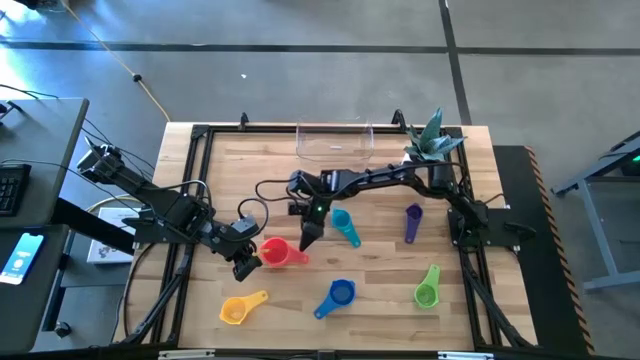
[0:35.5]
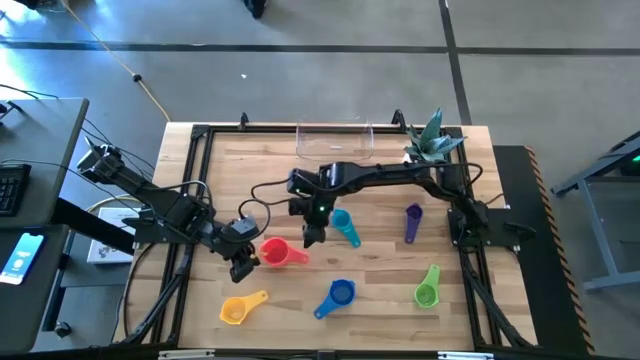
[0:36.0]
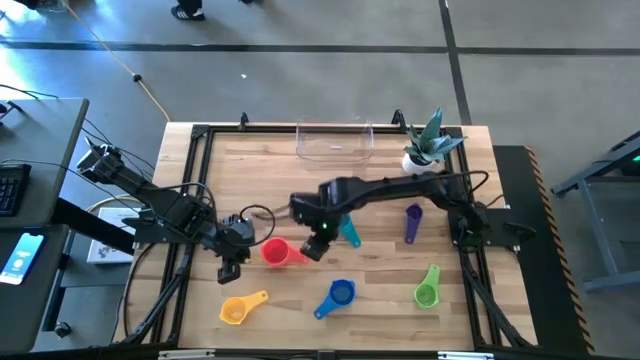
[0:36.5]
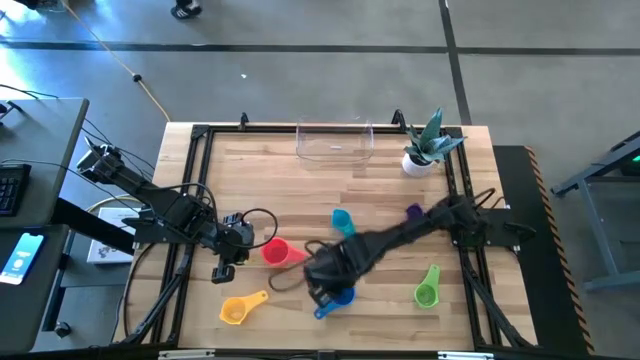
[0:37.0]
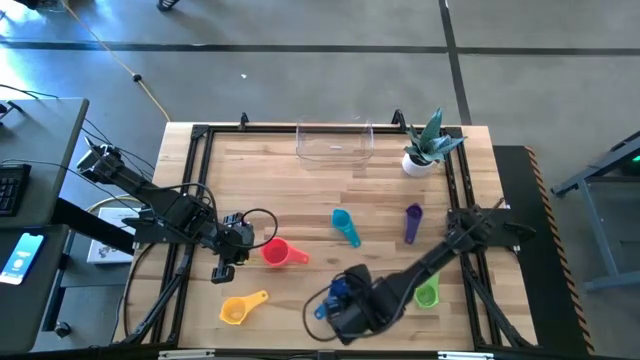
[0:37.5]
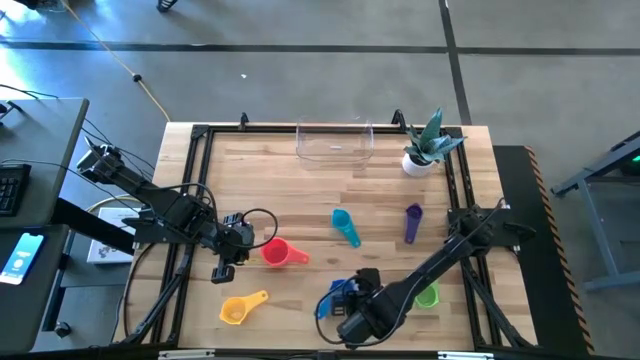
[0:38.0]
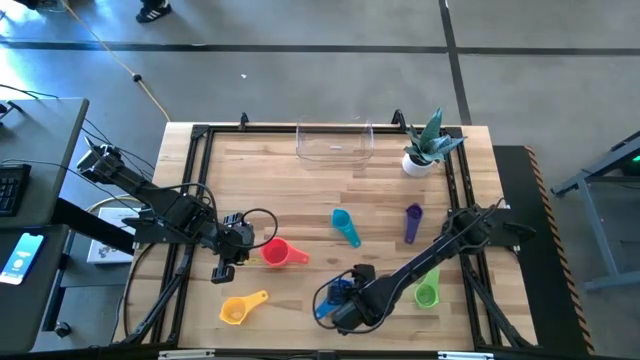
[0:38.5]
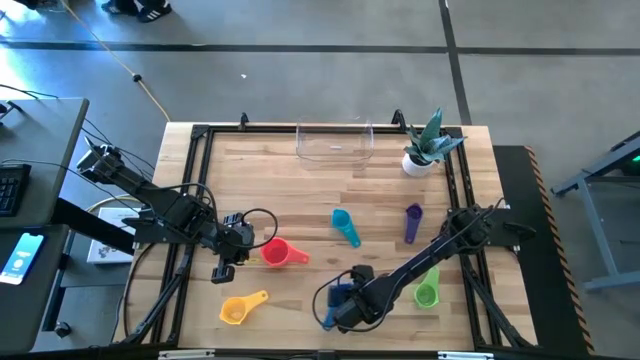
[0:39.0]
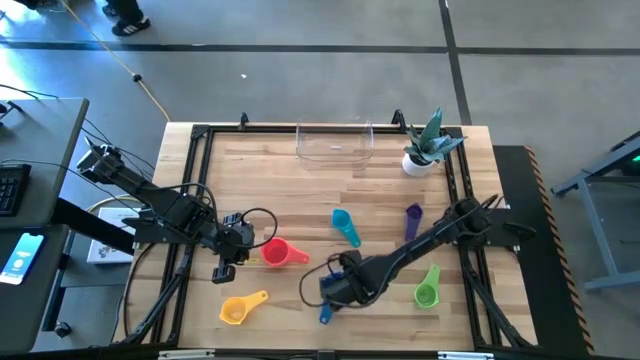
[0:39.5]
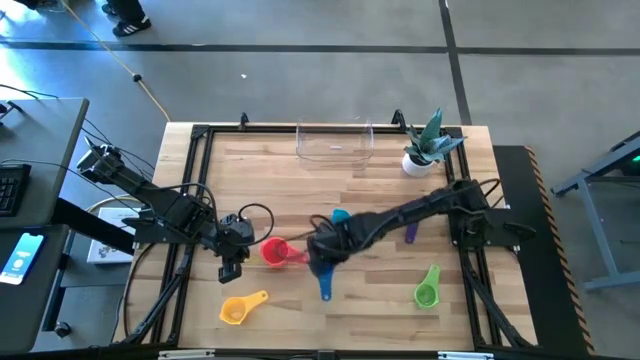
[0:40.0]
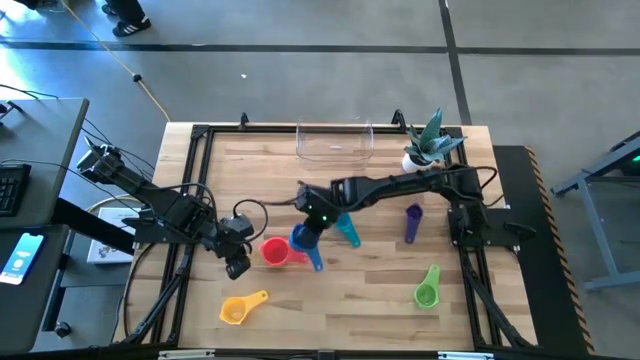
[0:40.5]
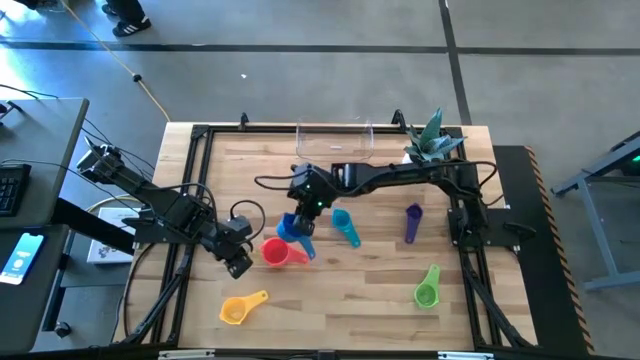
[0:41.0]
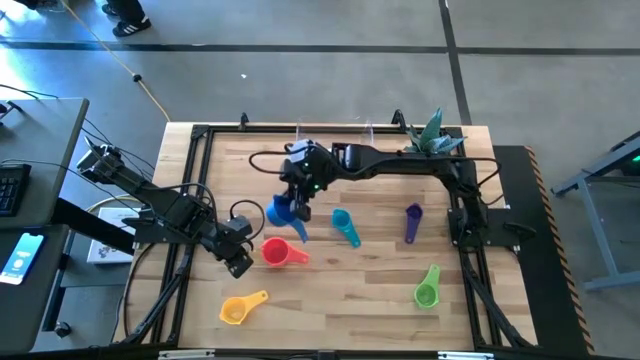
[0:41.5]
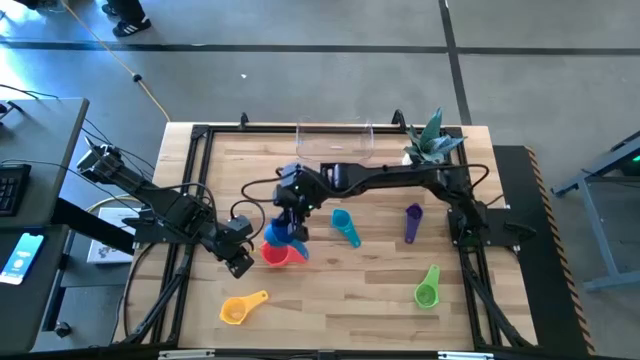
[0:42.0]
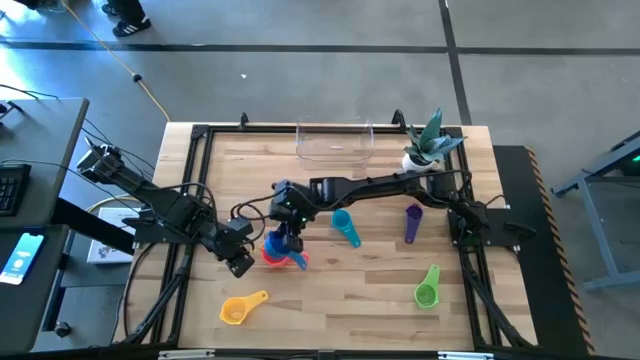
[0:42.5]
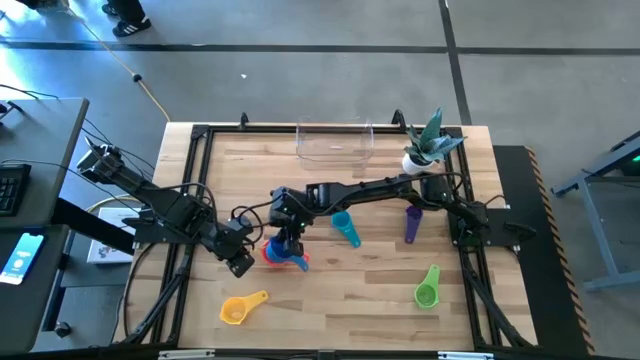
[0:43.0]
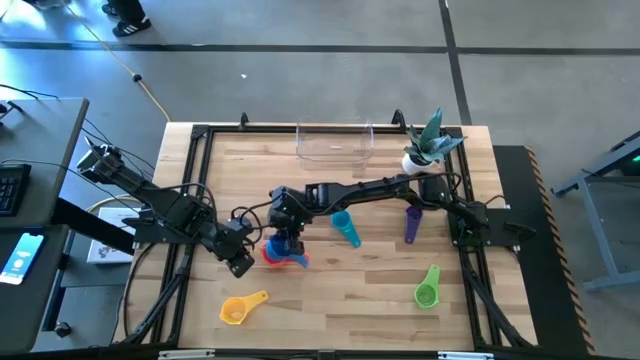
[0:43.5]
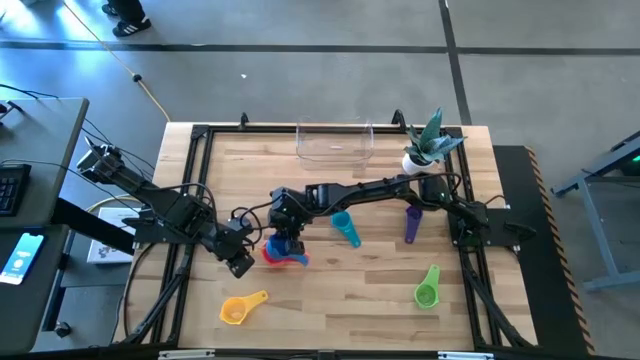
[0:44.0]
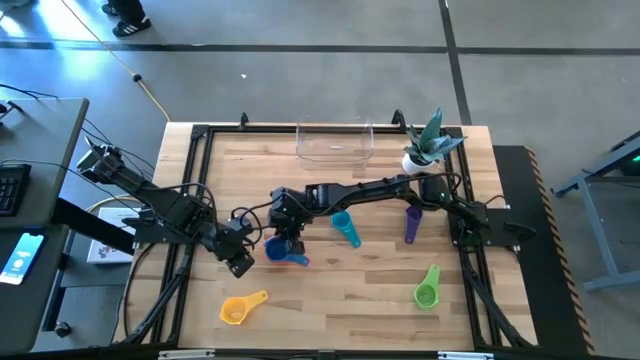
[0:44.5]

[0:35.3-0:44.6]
Task: Nest measuring cups in basket
Stack the blue measuring cup on top of the red measuring cup

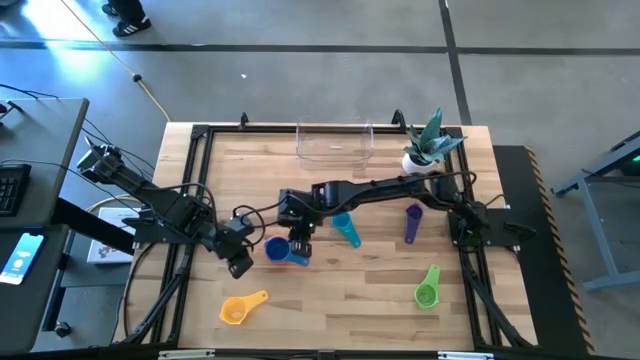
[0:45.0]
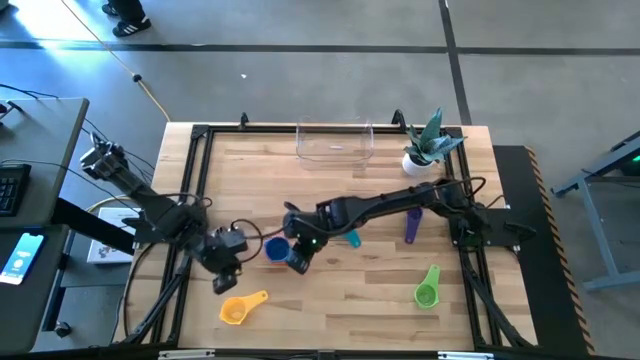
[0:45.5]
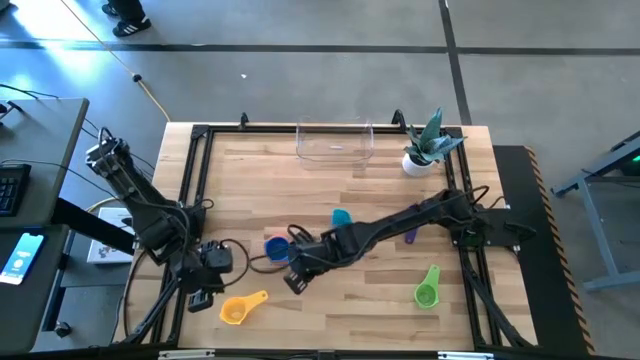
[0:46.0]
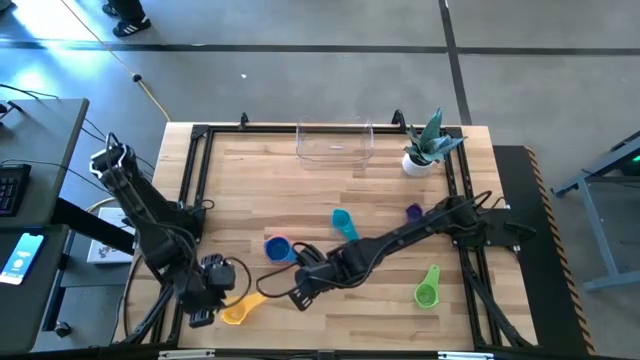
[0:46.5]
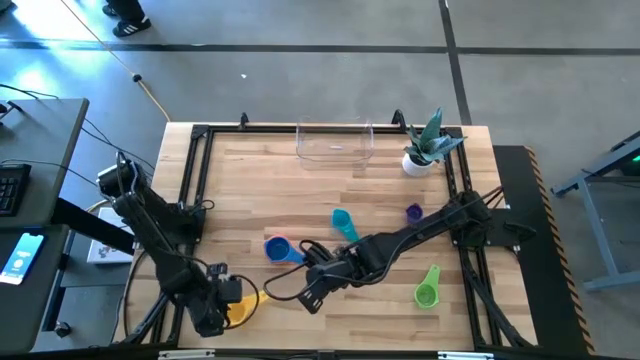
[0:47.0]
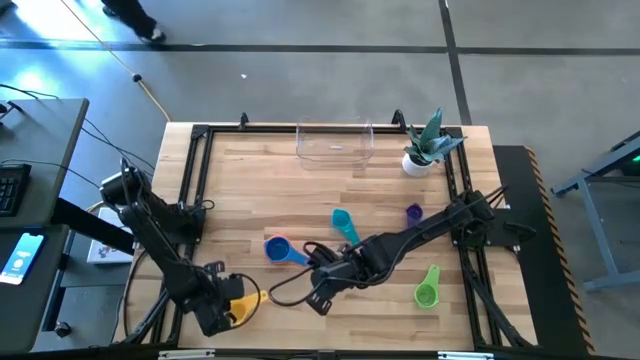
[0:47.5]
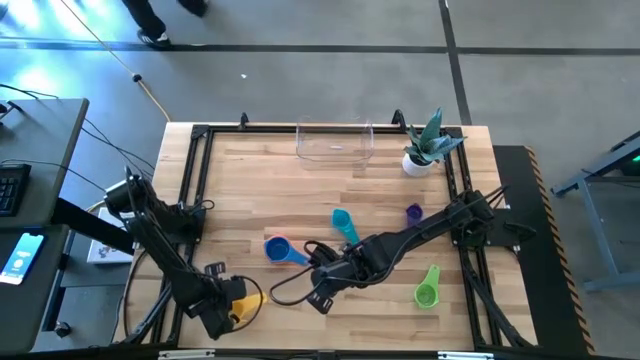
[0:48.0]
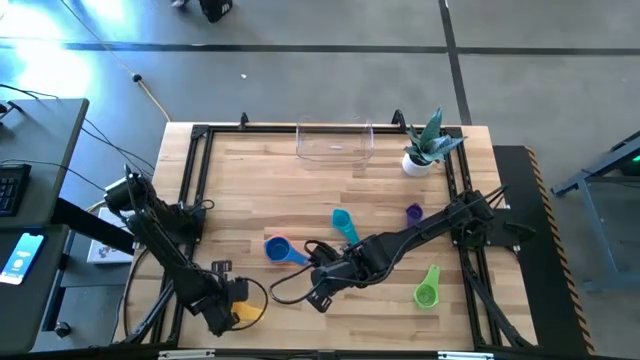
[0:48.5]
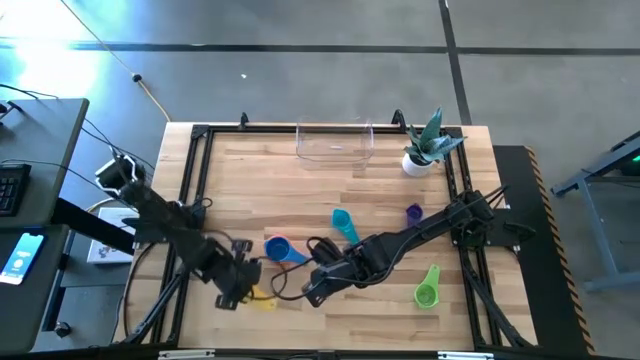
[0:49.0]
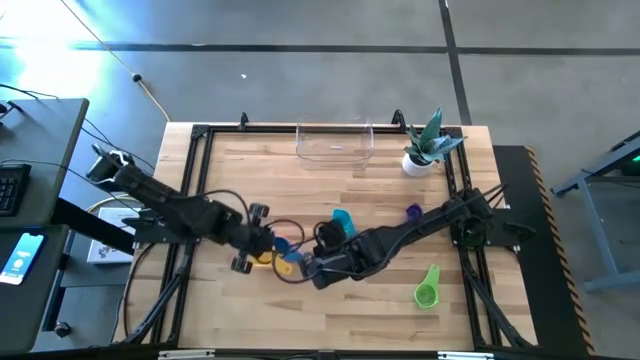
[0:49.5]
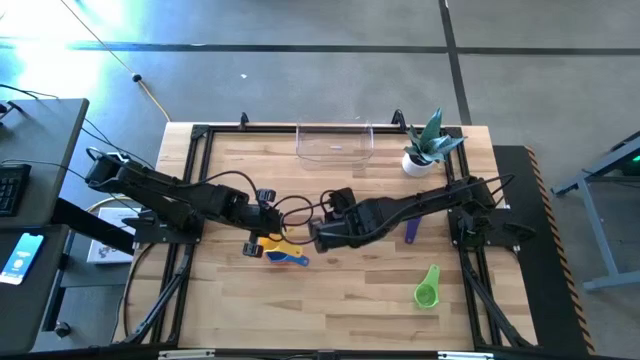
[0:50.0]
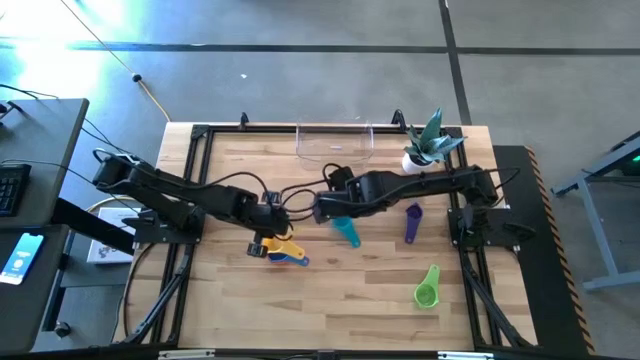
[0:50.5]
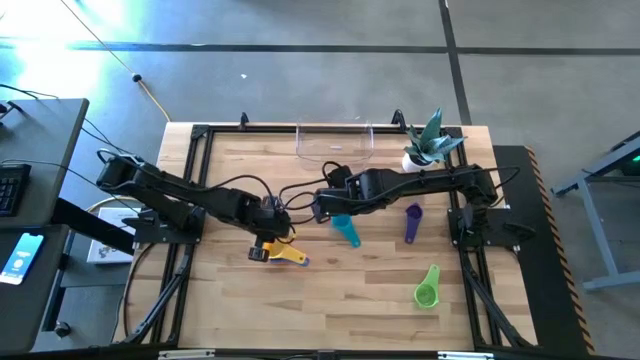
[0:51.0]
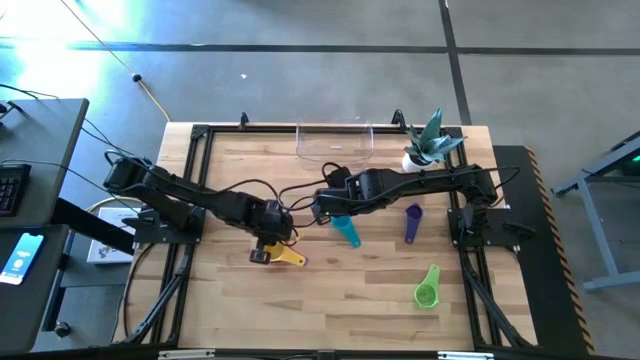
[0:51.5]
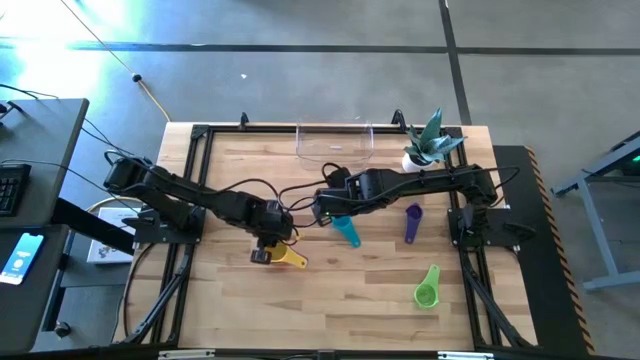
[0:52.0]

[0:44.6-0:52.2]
Stack the yellow measuring cup on top of the blue measuring cup

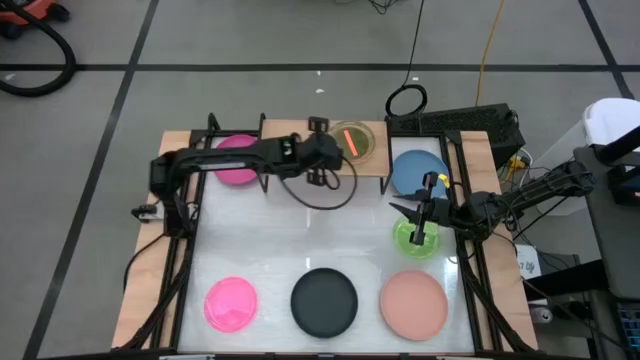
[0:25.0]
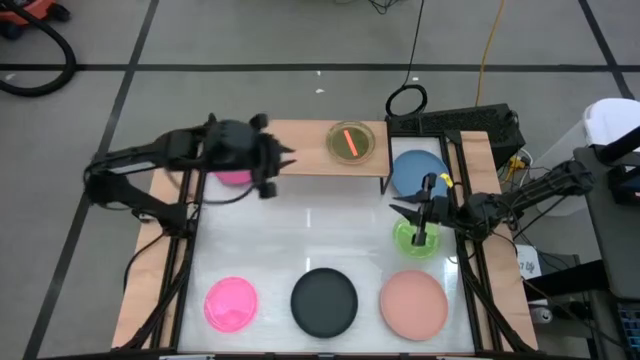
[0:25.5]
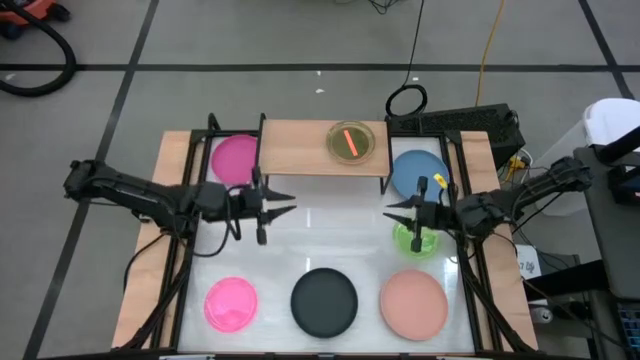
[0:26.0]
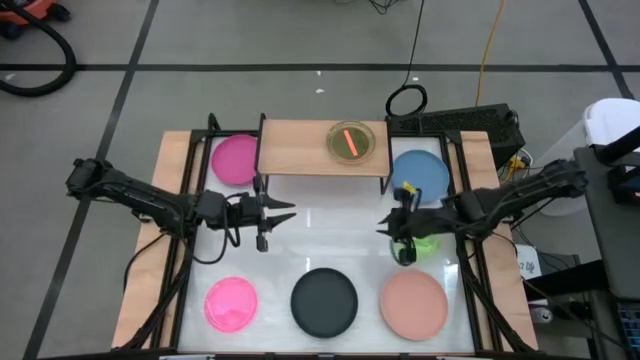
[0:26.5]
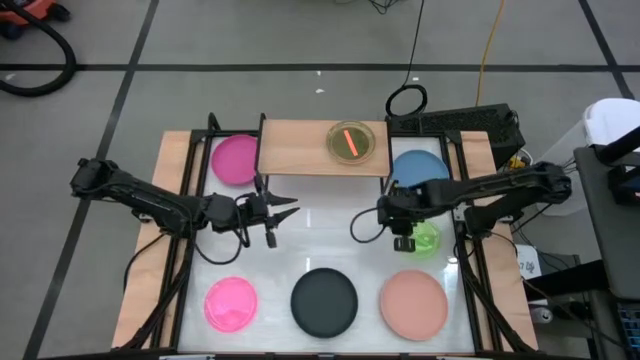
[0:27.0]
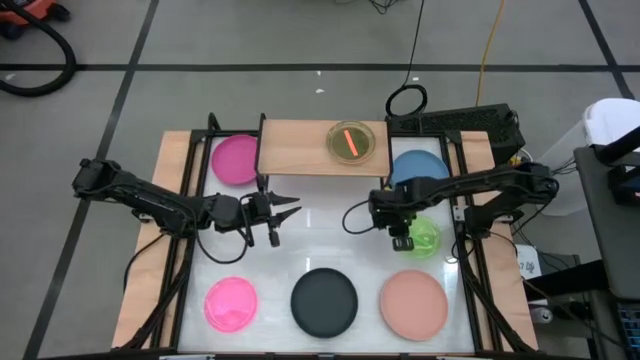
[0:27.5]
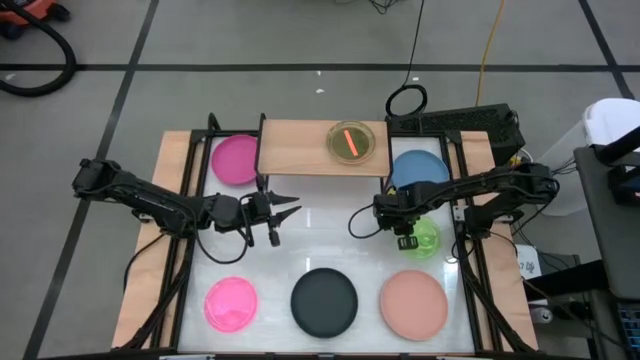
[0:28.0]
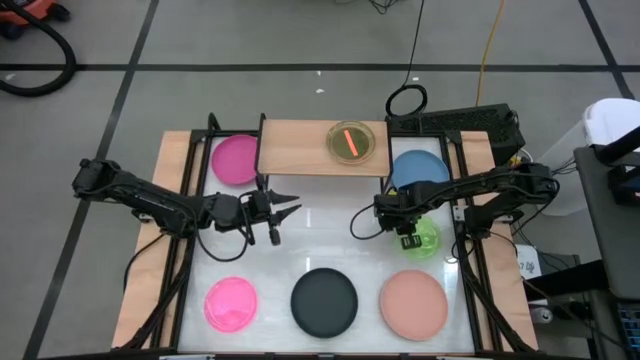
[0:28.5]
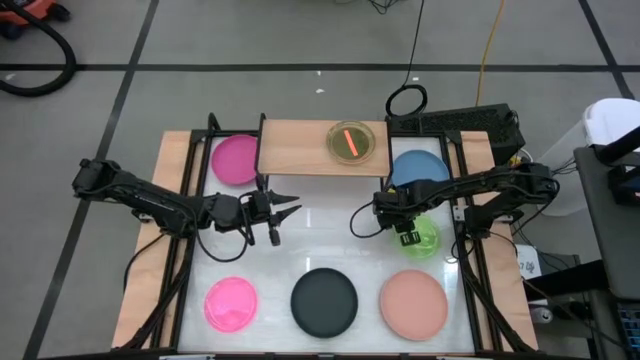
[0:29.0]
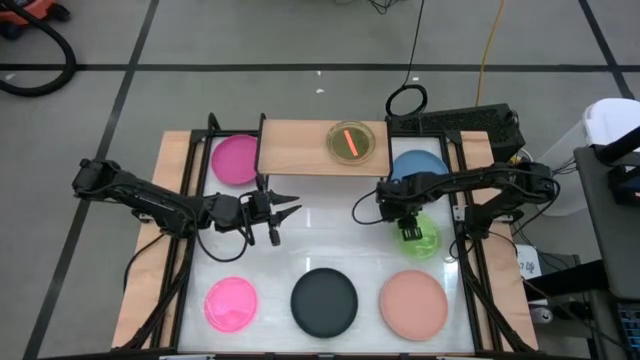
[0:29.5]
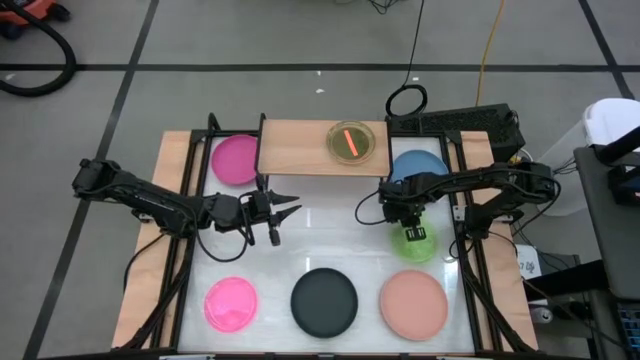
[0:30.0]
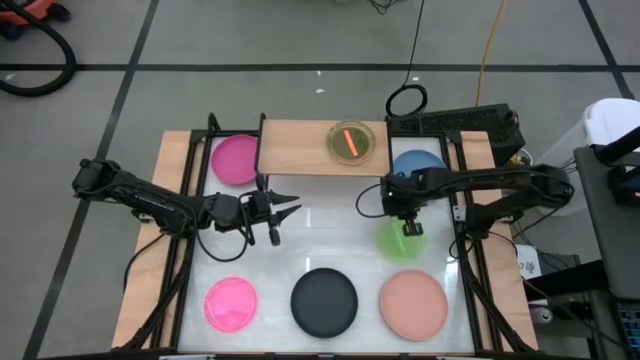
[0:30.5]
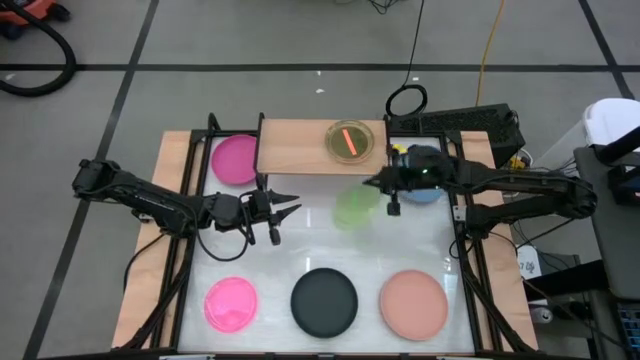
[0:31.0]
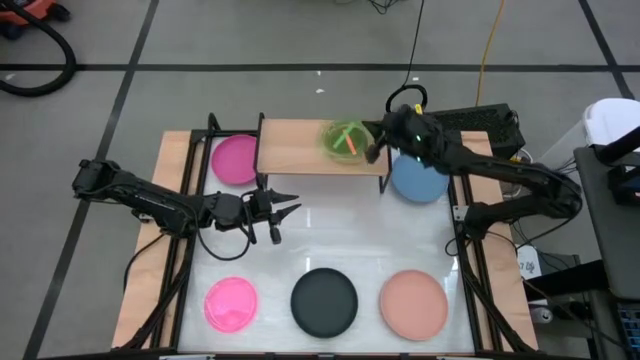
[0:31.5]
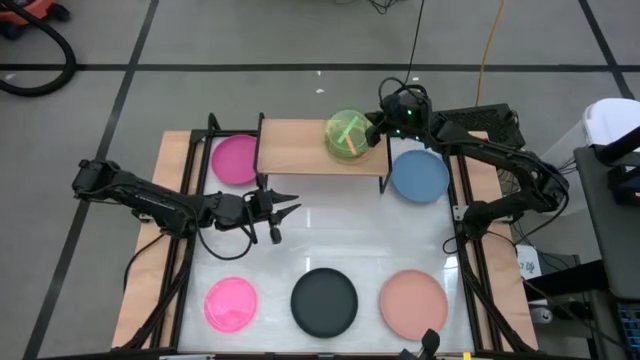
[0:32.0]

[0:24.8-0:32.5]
Task: Place and stack plates onto a shelf
Stack the green plate on top of the orange plate on the shelf
